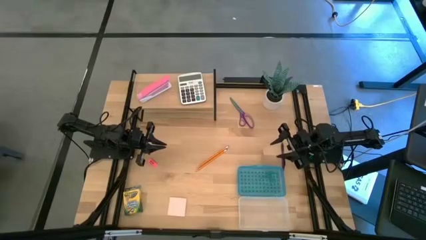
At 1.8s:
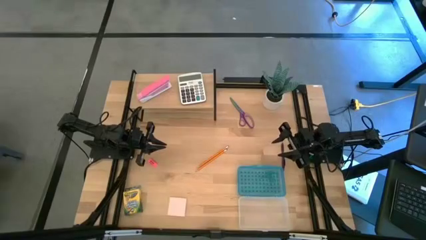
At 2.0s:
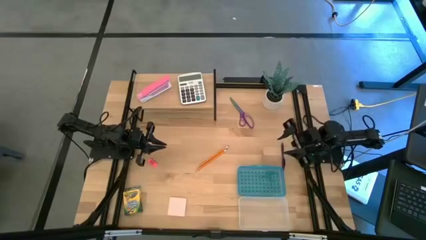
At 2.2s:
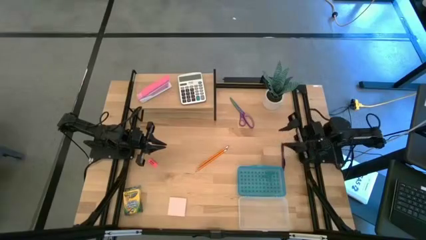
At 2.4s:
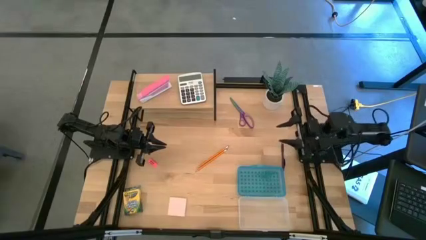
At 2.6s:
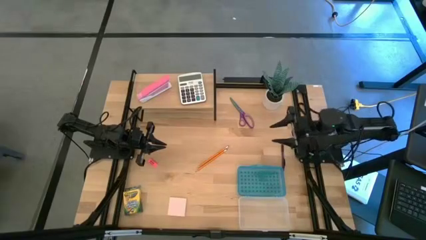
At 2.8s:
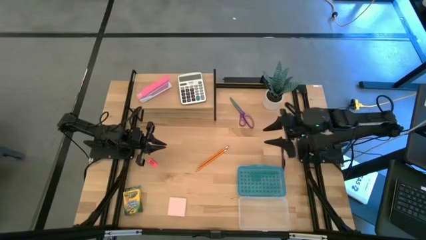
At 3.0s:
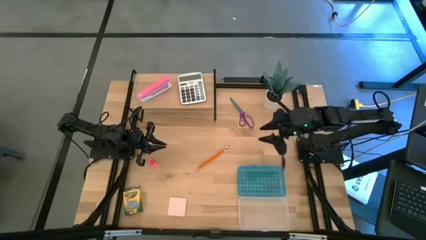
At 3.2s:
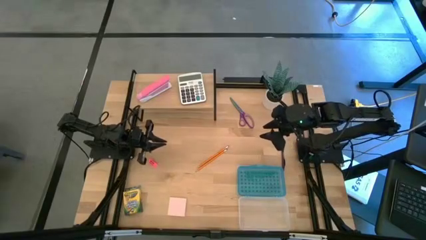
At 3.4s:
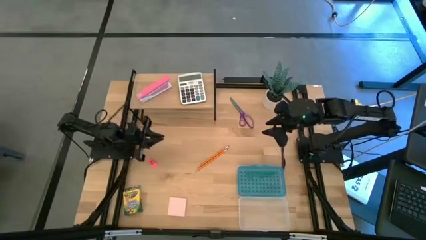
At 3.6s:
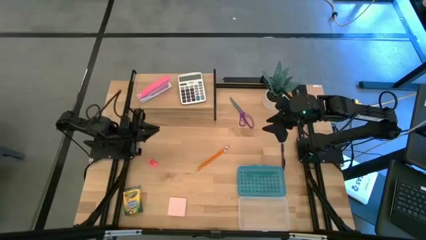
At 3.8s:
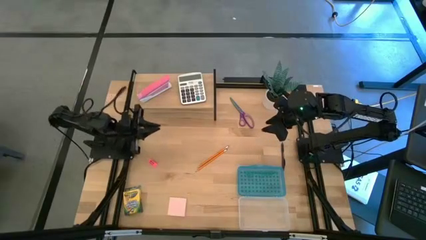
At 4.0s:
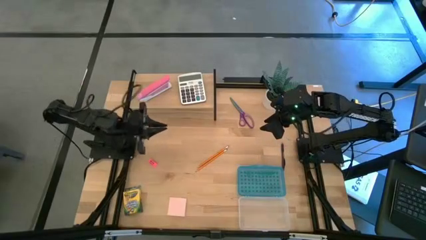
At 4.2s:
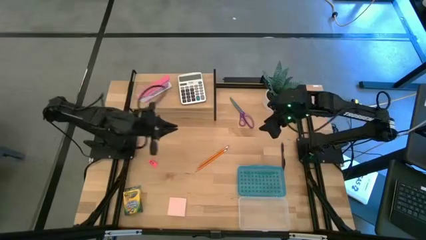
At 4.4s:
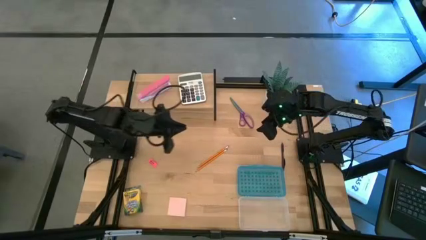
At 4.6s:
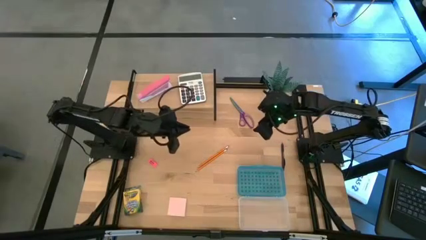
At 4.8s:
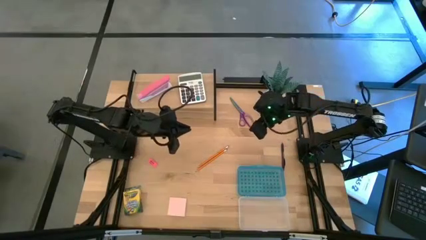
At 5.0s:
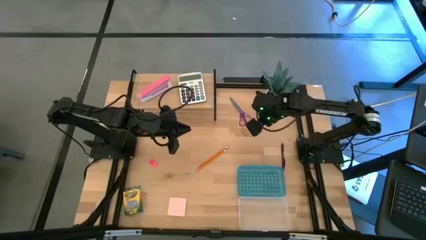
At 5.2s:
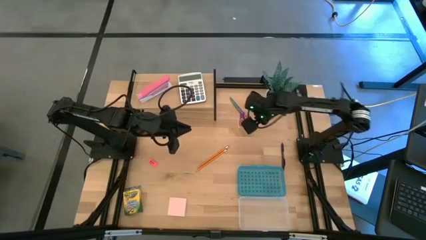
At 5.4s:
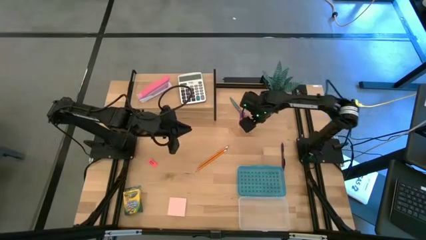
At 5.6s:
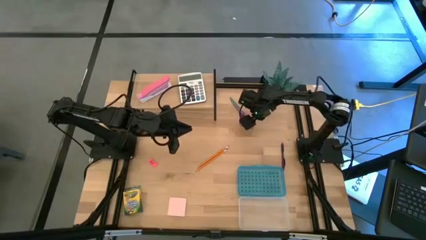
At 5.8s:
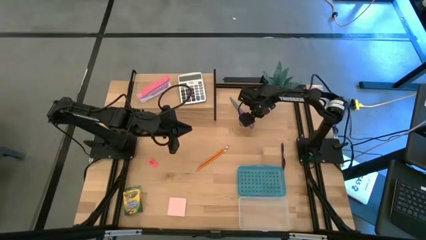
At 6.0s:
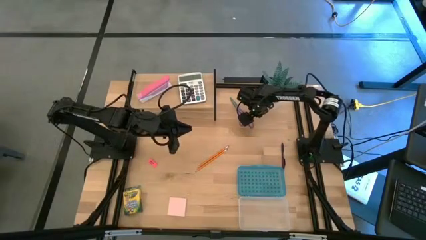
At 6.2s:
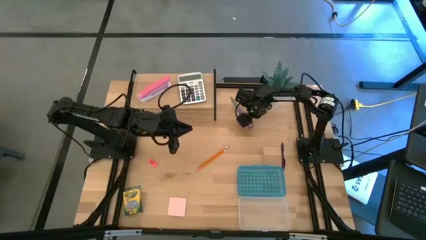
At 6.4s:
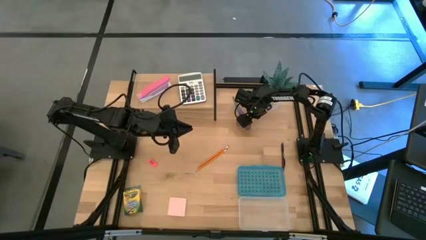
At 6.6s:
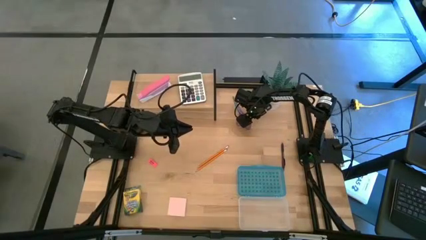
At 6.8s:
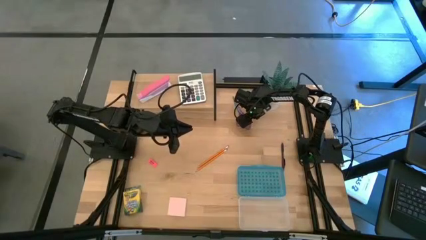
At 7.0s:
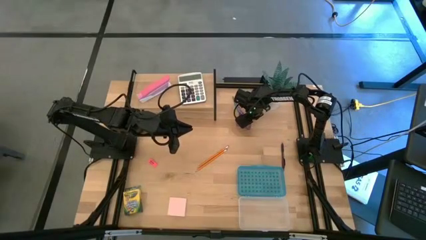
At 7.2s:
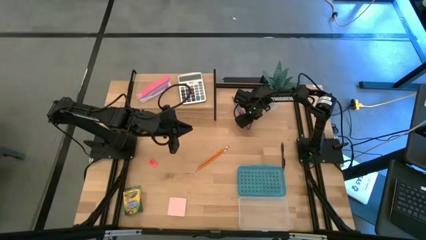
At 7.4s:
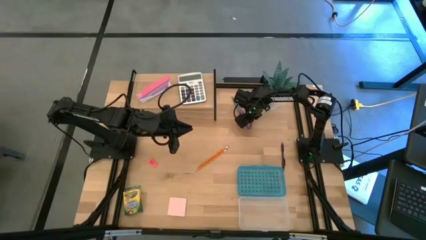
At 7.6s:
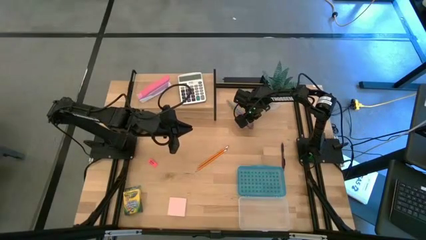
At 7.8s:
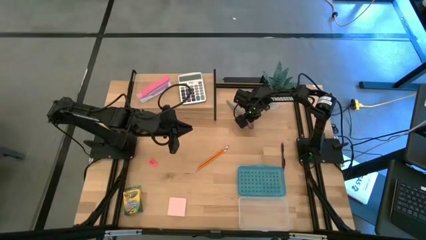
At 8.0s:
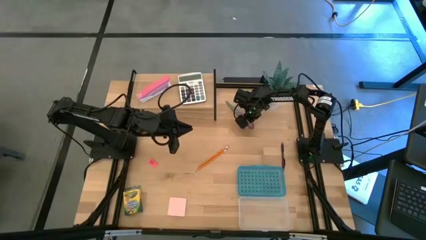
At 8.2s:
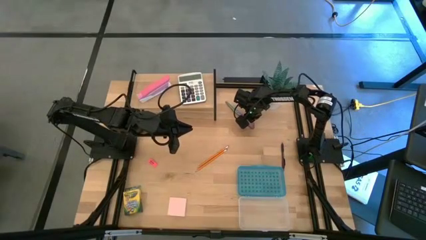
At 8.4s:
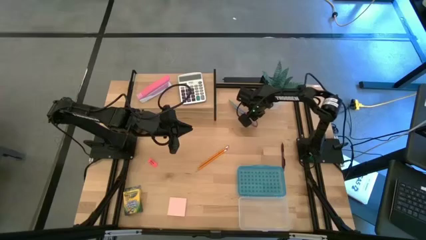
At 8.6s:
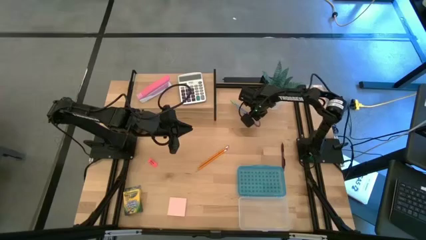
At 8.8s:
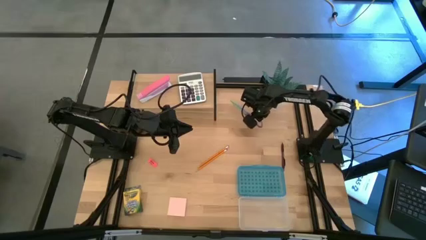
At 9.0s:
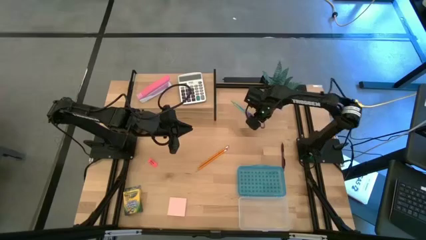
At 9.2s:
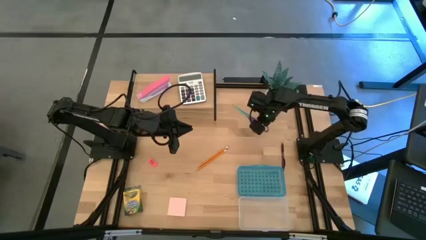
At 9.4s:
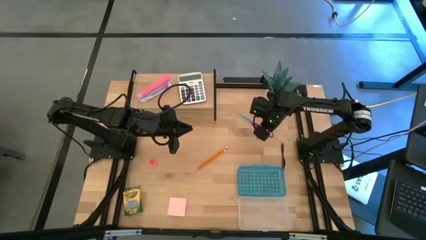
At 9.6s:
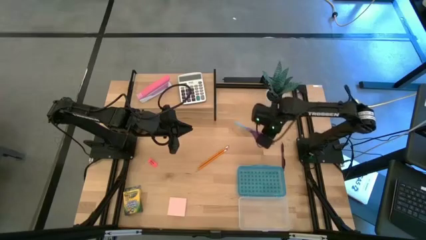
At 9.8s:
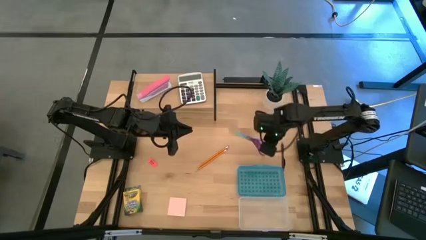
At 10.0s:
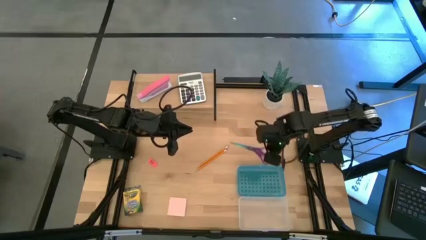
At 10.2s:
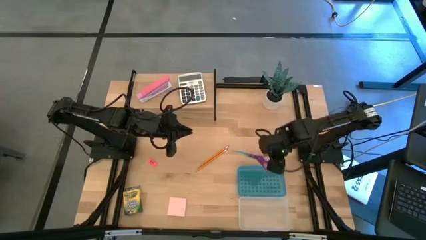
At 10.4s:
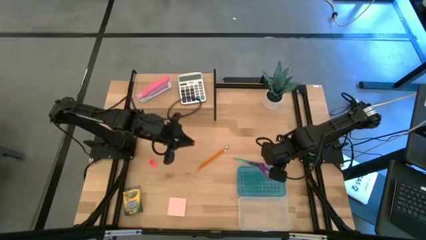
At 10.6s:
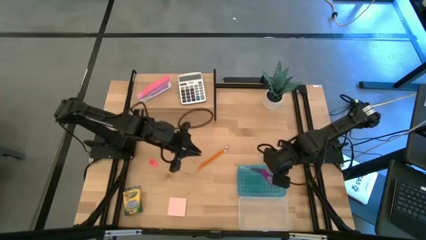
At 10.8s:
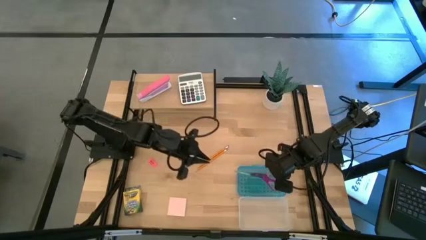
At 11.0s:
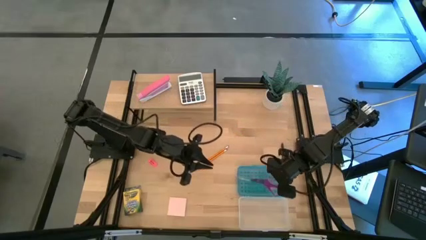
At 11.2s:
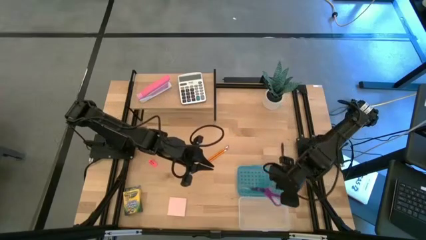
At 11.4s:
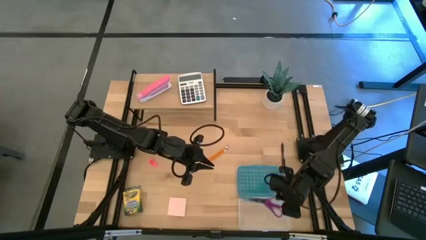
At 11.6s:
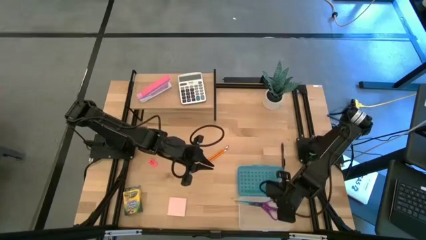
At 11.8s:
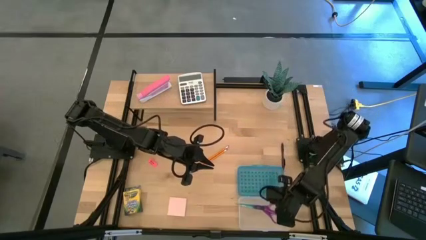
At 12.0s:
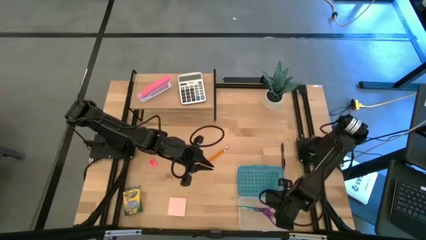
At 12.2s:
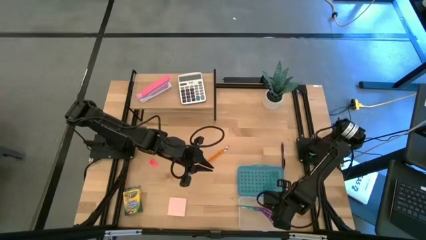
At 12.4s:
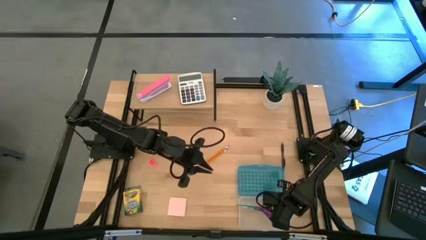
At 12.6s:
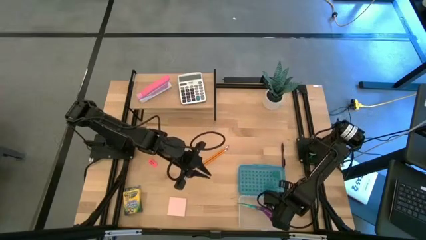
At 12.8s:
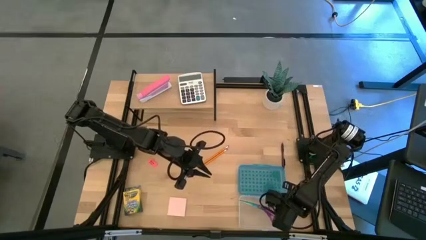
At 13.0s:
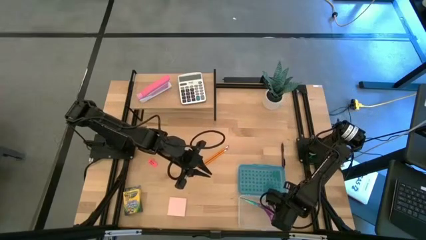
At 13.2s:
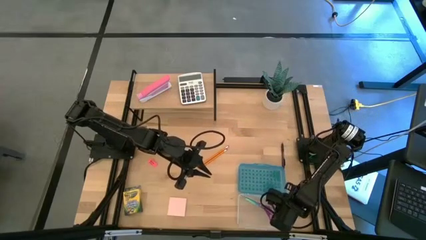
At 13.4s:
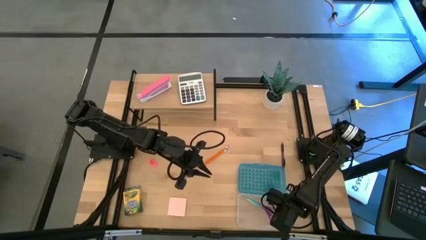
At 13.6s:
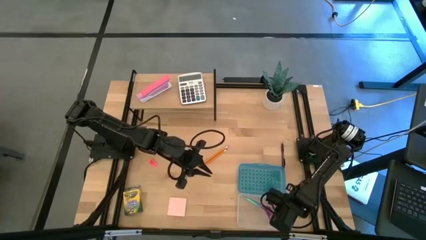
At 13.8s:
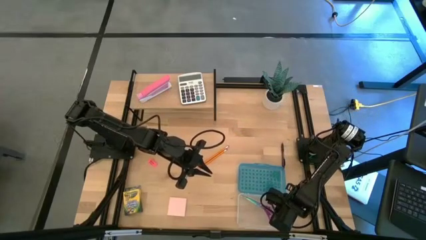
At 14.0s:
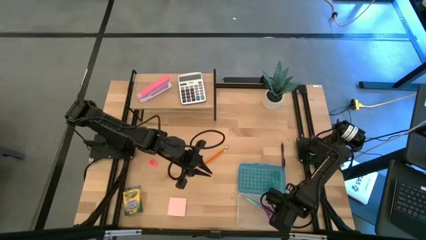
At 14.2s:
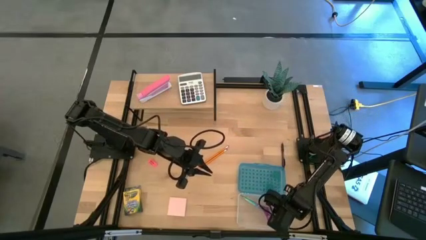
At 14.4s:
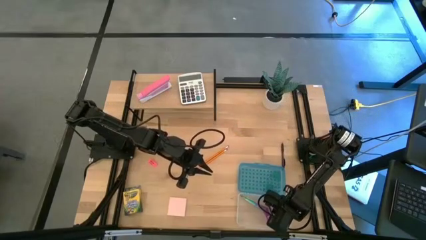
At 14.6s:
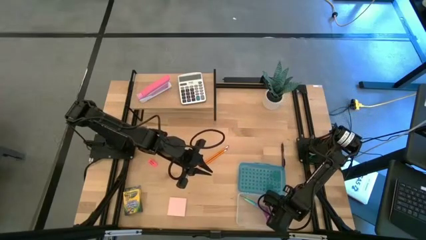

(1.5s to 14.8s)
Task: Pack school essentials
Put the violet scissors into the blue supply box

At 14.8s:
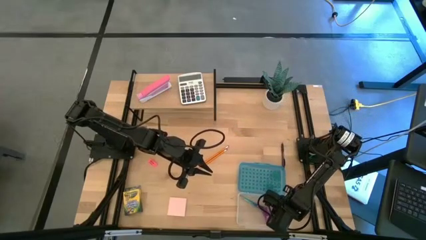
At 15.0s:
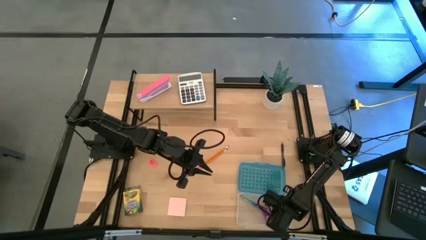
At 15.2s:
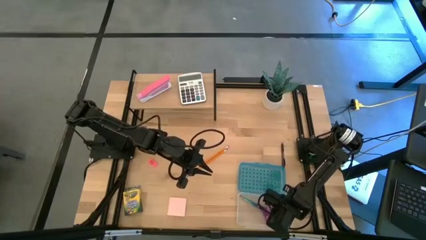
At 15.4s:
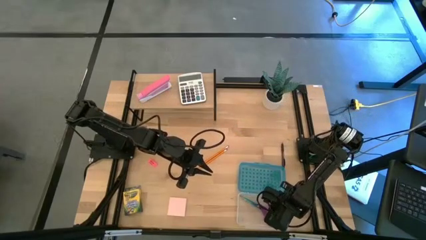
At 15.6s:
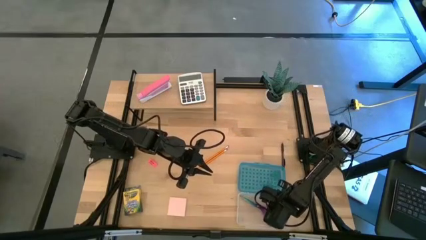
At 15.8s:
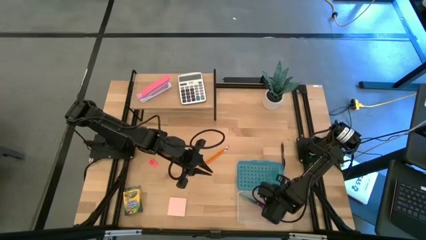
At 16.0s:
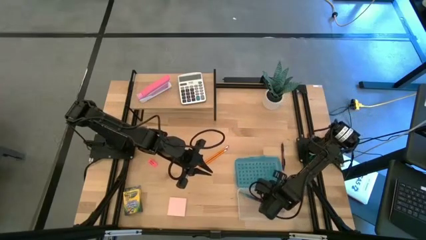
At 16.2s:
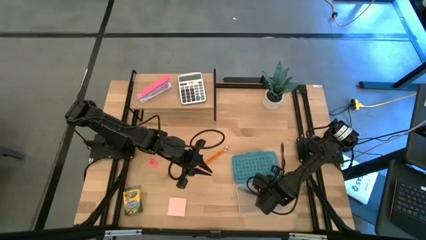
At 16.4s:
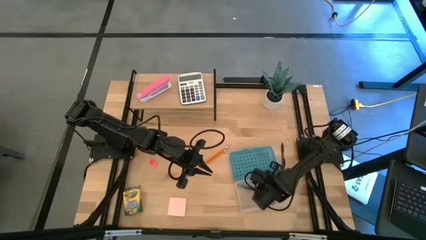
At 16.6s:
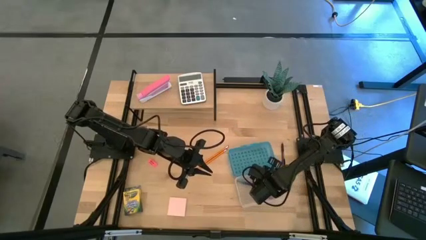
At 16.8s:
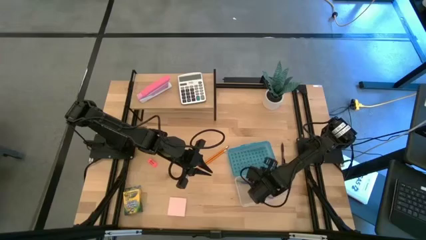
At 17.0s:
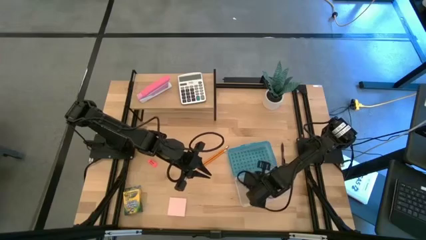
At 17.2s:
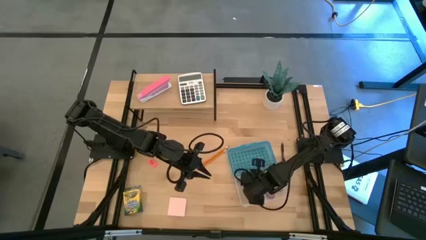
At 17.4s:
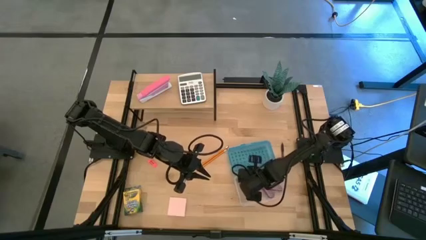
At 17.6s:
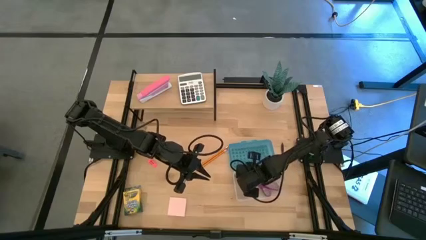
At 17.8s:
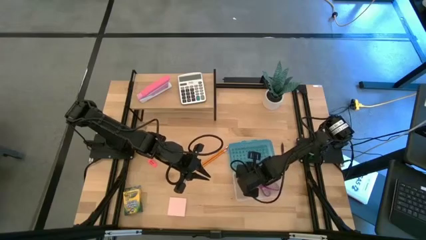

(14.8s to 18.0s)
Adjust the blue supply box
